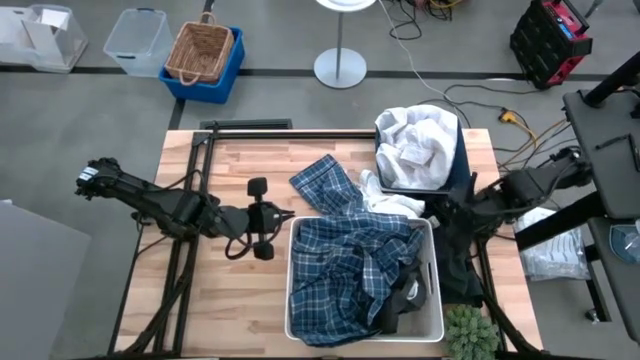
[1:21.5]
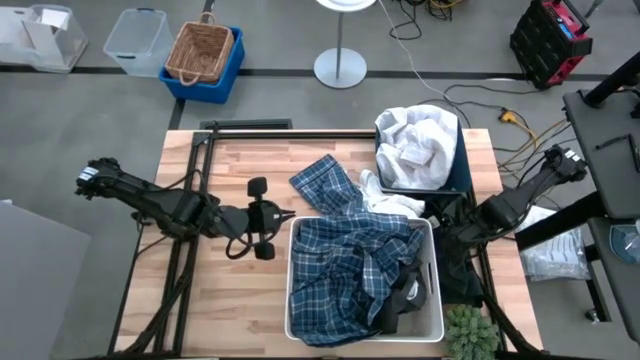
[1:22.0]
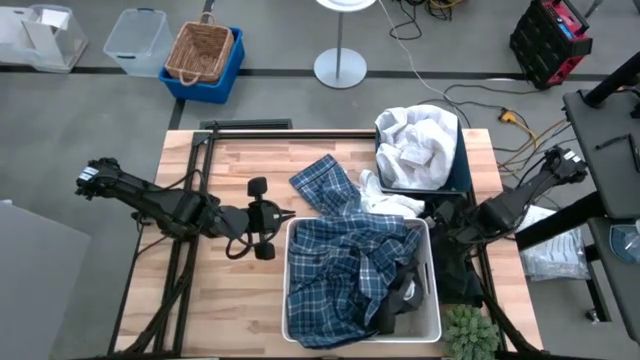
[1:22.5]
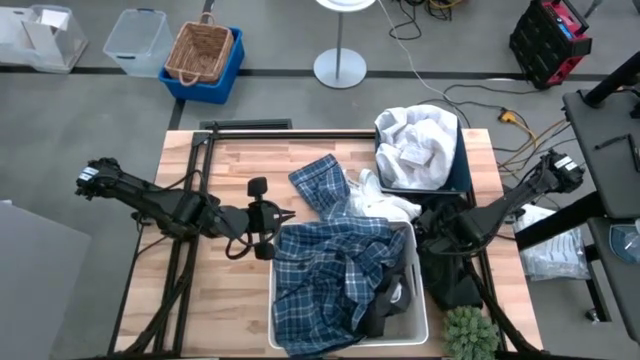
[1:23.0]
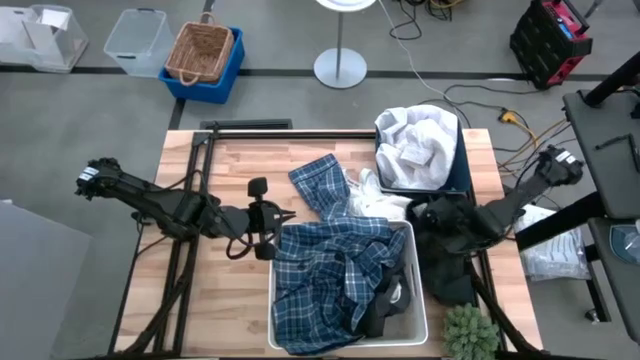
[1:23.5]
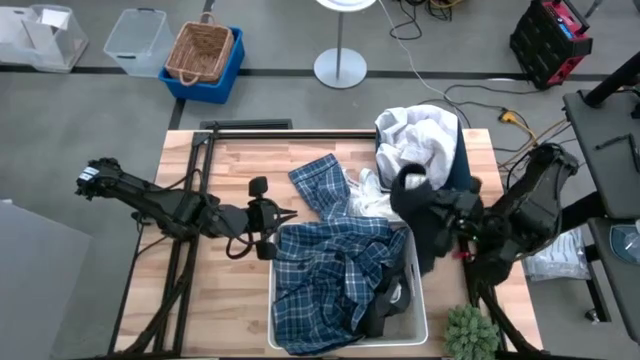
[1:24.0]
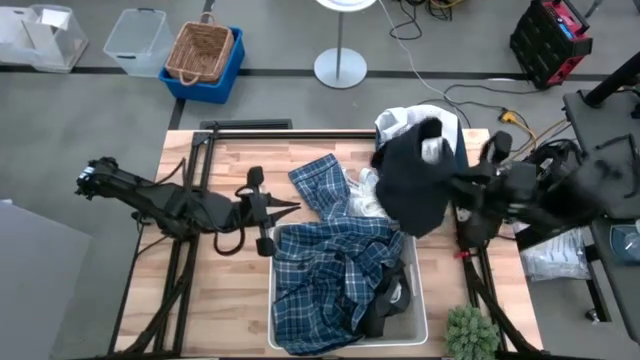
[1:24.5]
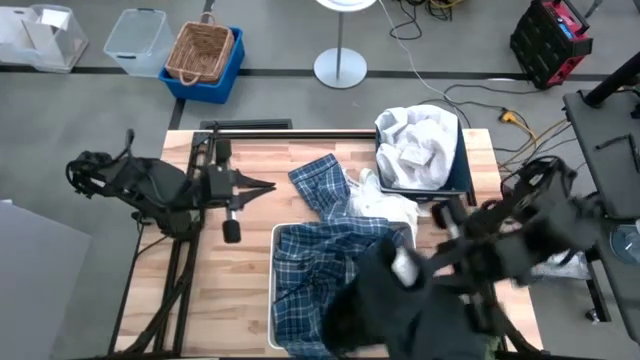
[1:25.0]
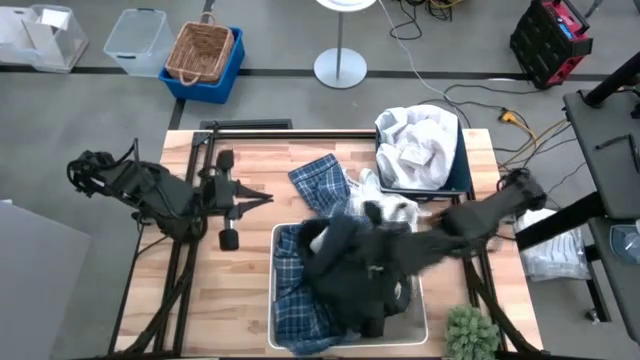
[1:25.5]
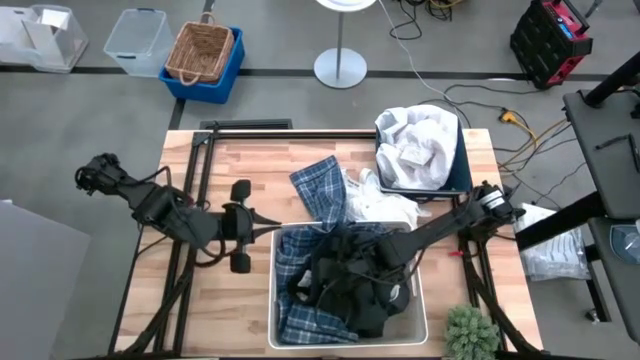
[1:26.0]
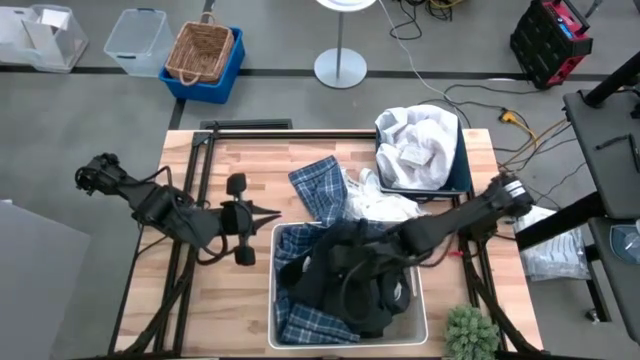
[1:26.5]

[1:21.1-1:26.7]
Task: Sort clothes
Put the black shorts into the white bin

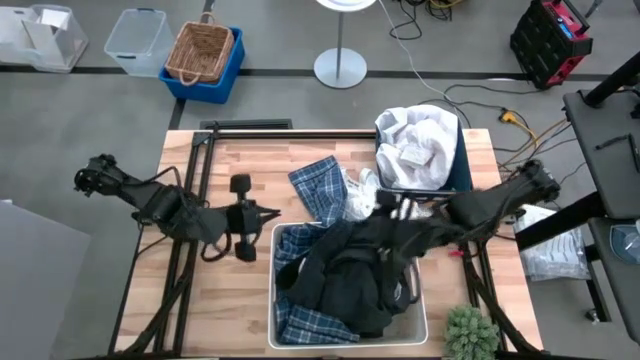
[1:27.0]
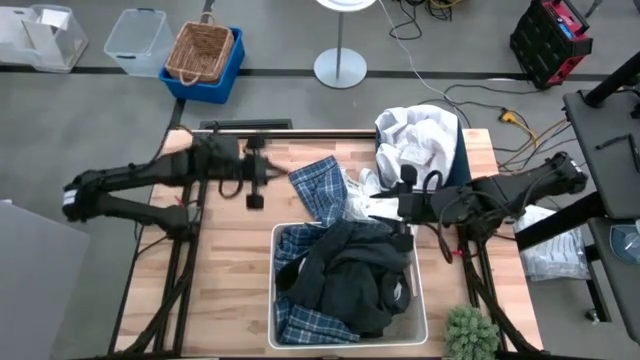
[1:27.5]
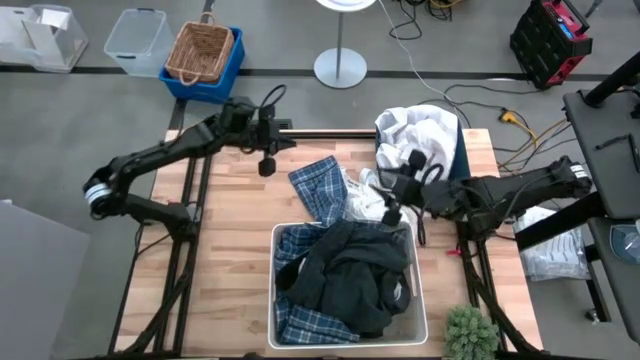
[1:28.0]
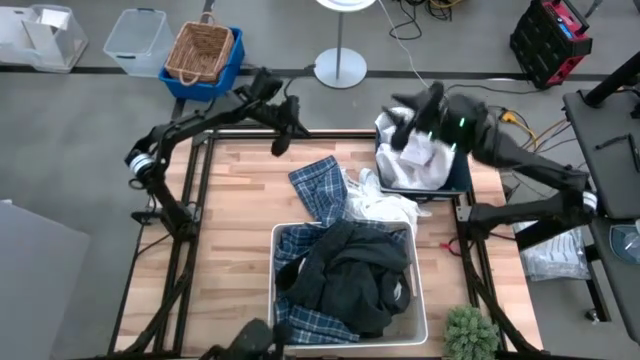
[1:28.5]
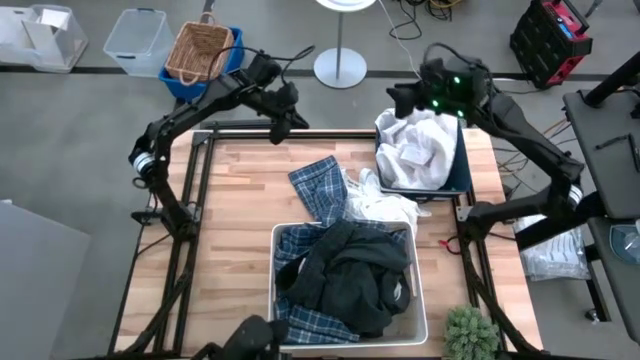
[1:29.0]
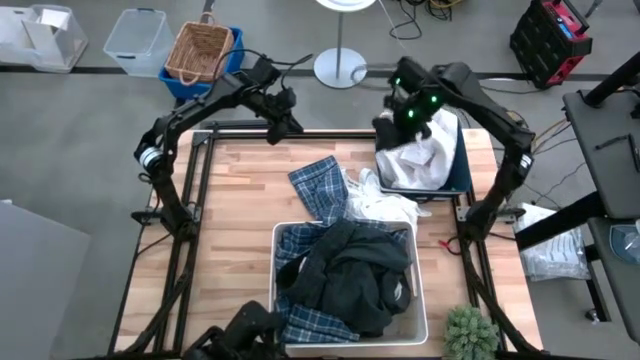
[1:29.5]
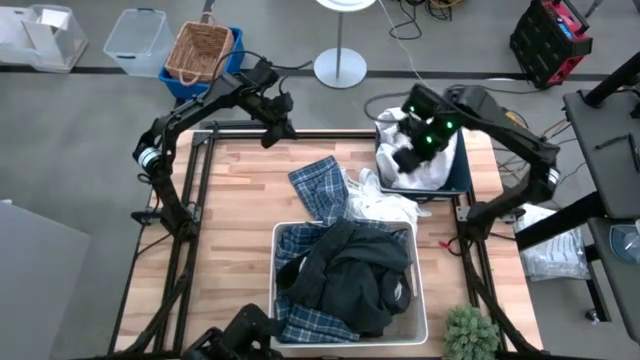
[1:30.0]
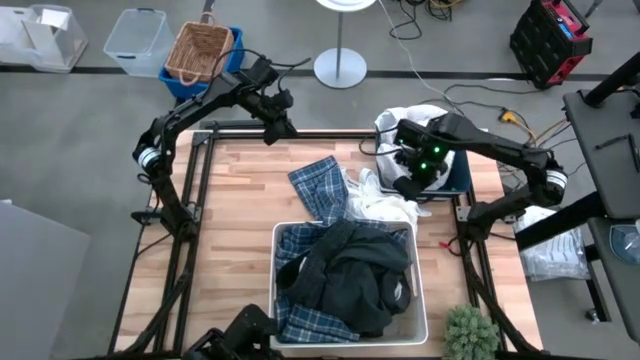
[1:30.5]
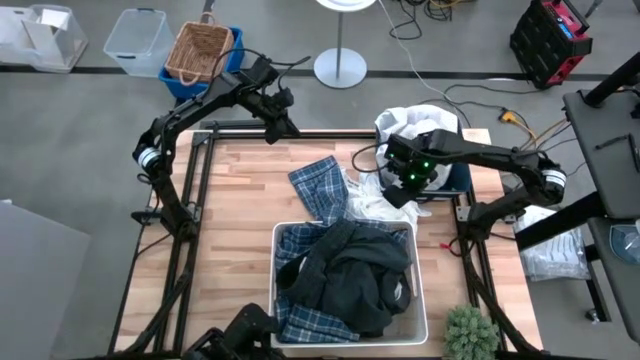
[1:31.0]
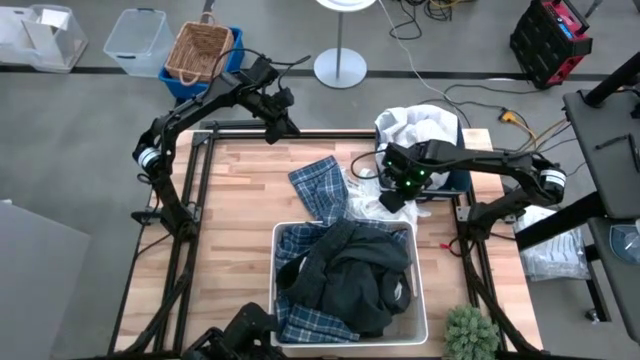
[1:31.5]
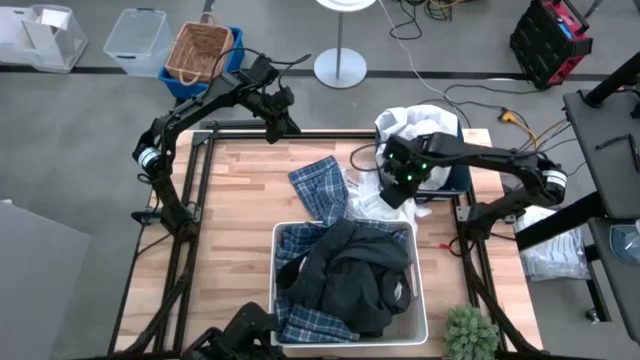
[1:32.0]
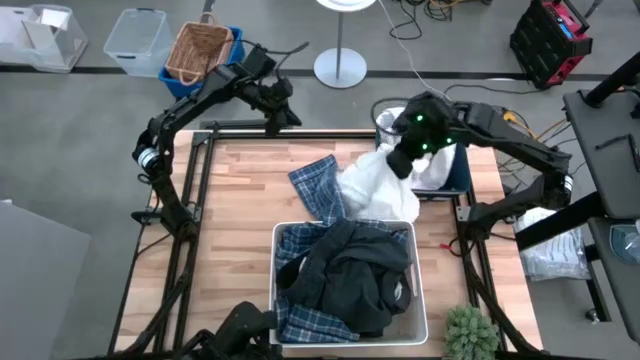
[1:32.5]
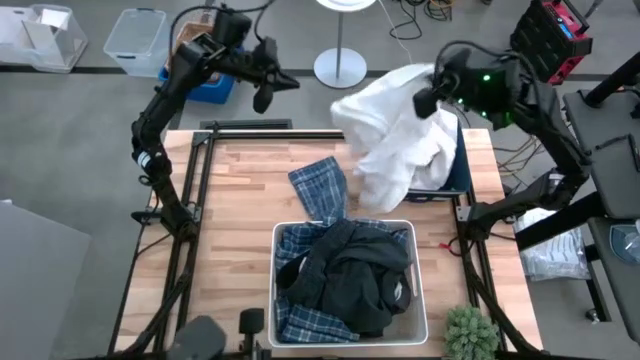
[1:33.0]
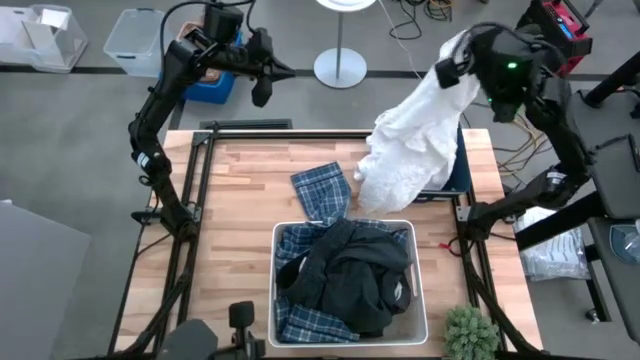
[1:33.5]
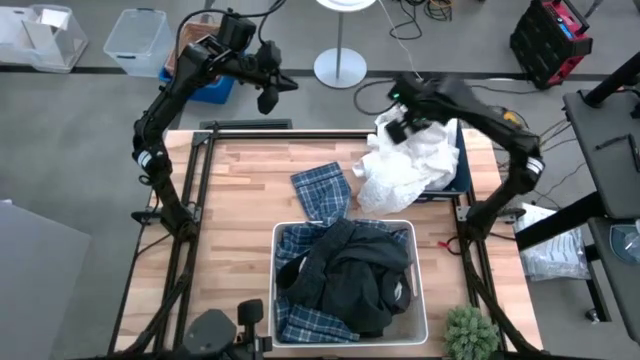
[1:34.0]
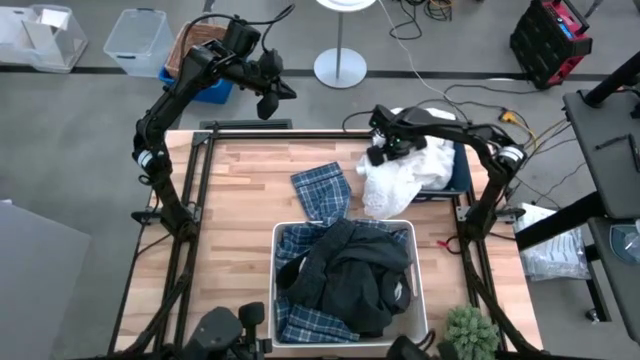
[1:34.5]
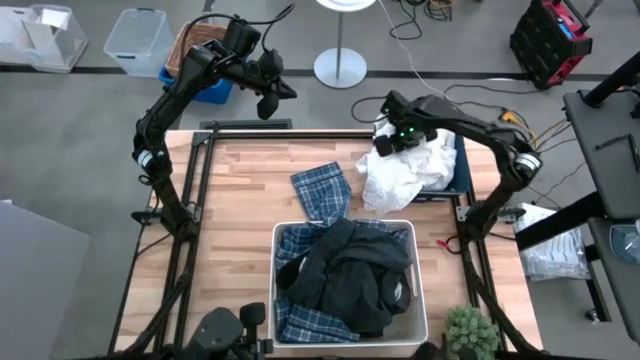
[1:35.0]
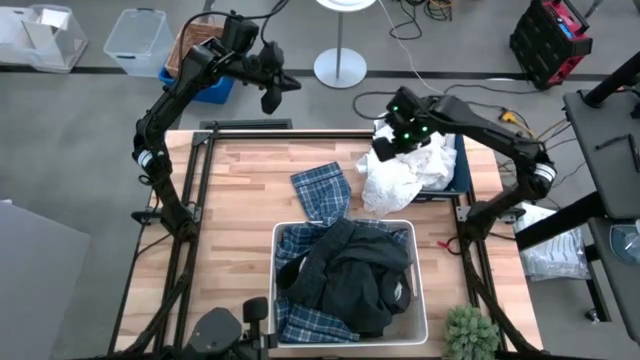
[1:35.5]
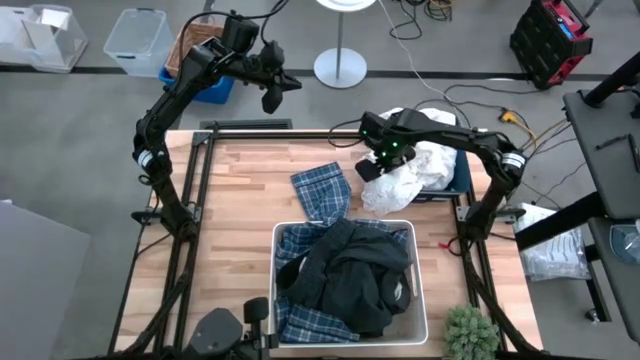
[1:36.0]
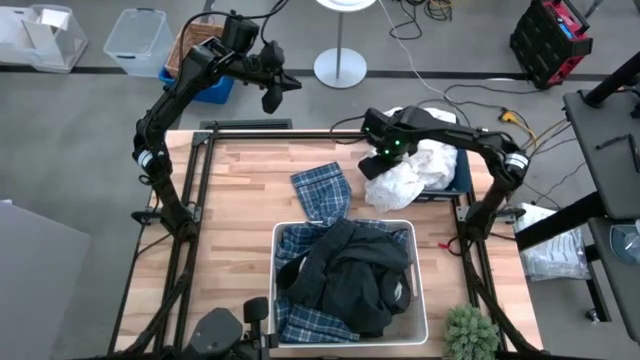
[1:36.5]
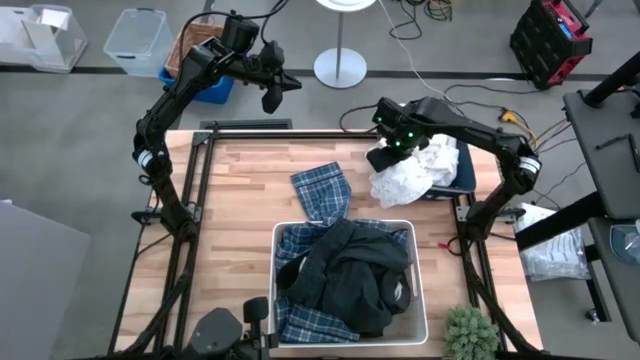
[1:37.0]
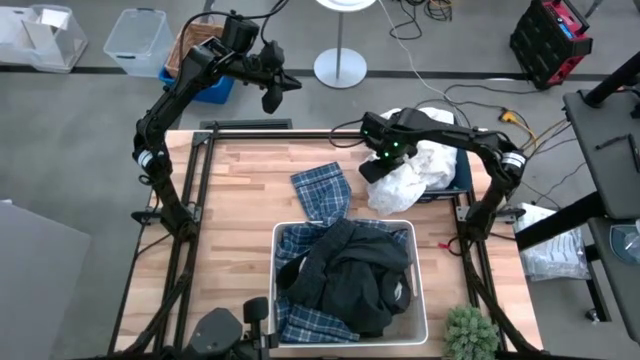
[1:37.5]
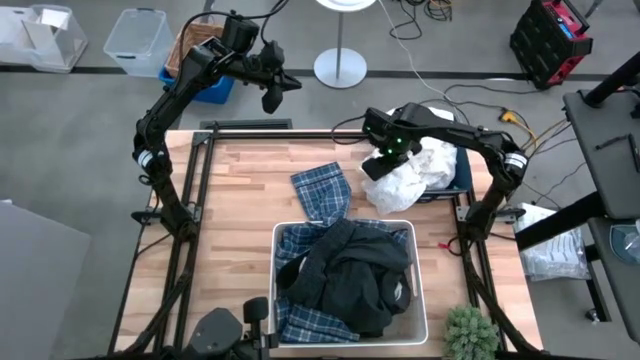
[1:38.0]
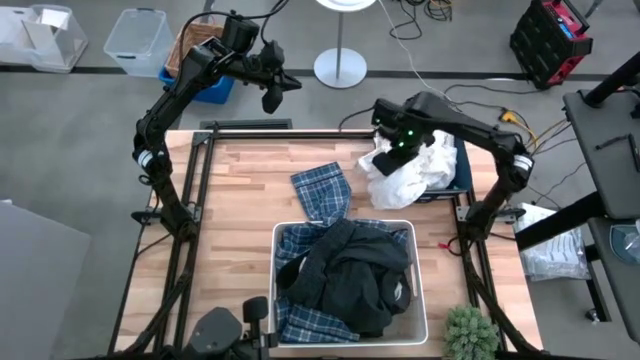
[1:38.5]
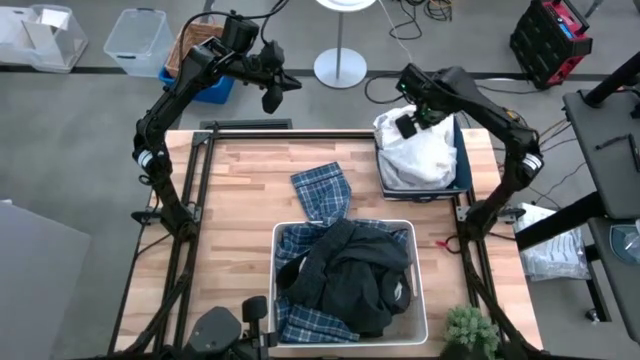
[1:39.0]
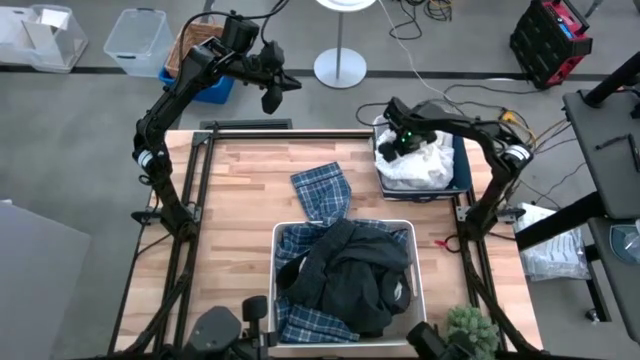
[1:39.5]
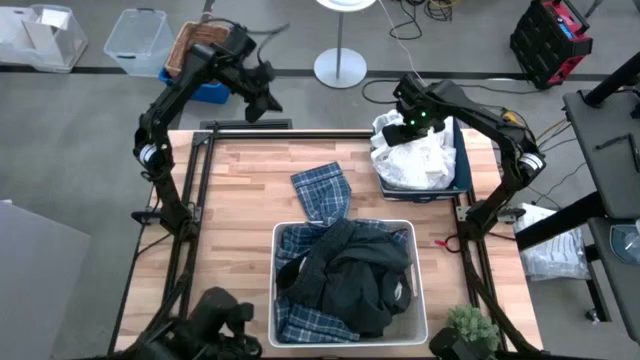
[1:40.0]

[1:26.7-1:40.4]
Put the white shirt into the blue bin
